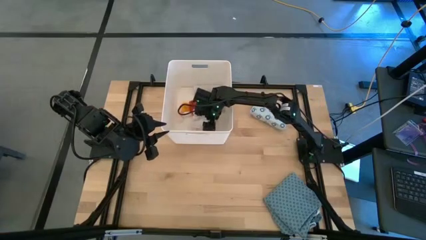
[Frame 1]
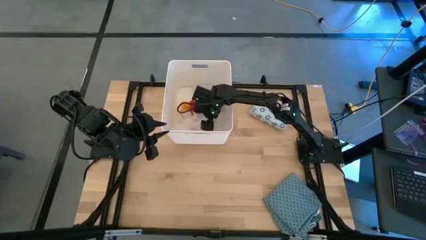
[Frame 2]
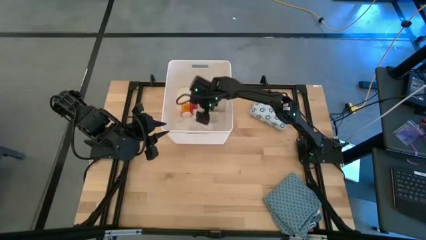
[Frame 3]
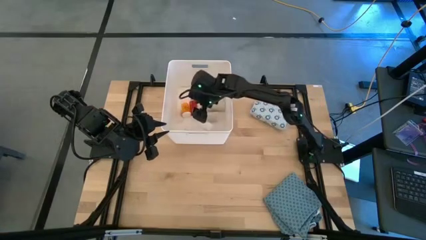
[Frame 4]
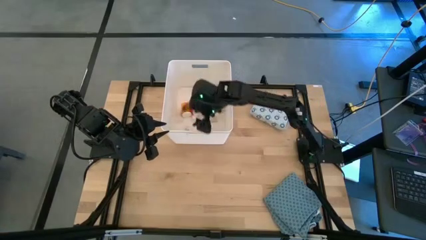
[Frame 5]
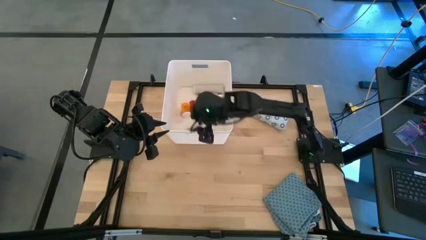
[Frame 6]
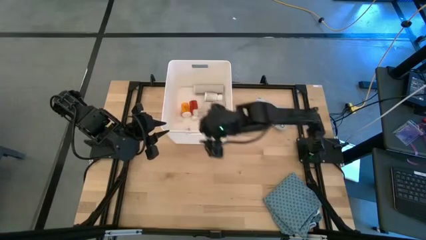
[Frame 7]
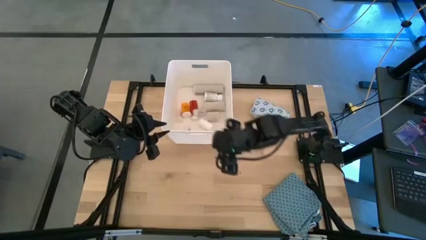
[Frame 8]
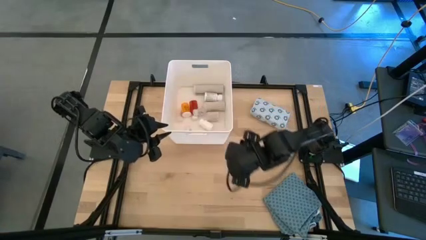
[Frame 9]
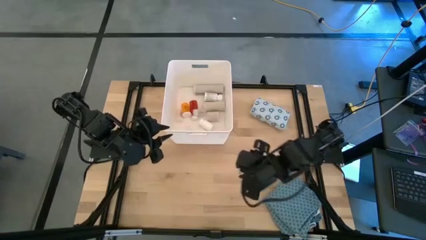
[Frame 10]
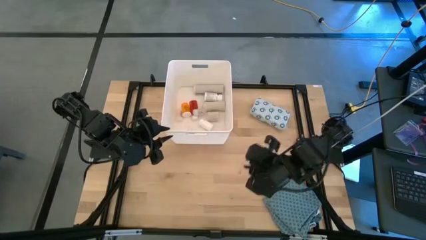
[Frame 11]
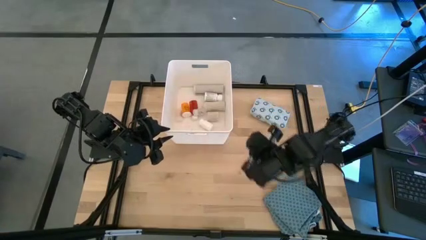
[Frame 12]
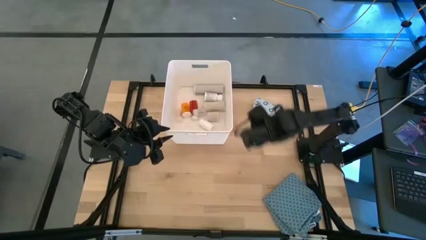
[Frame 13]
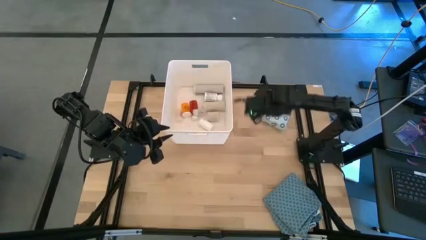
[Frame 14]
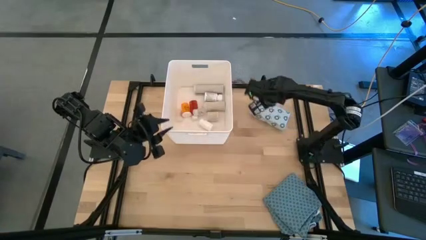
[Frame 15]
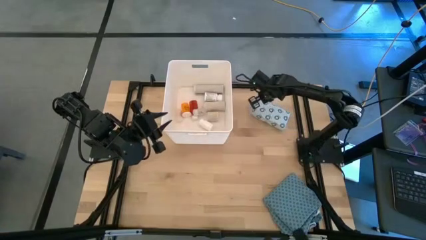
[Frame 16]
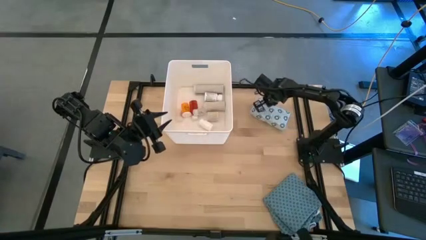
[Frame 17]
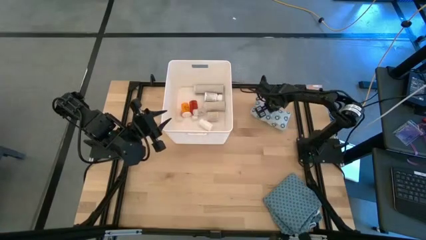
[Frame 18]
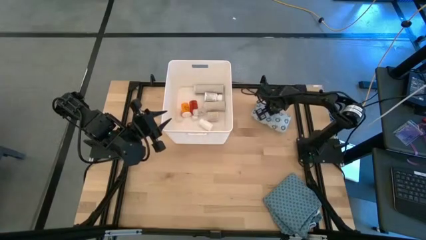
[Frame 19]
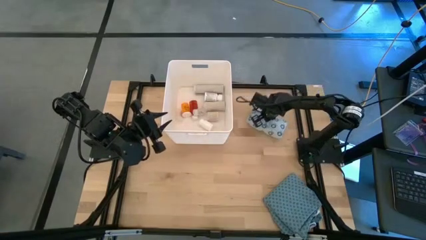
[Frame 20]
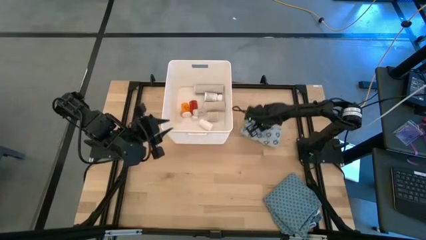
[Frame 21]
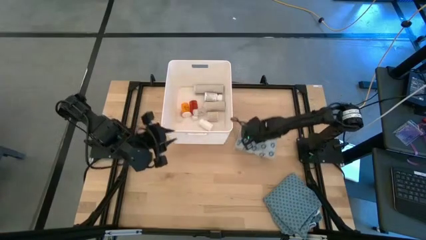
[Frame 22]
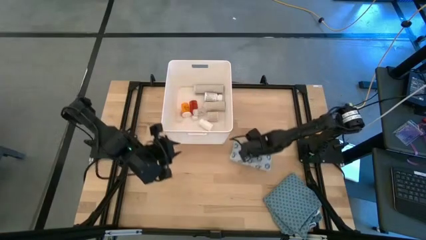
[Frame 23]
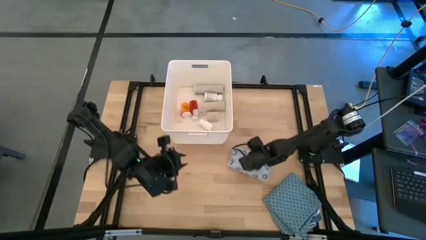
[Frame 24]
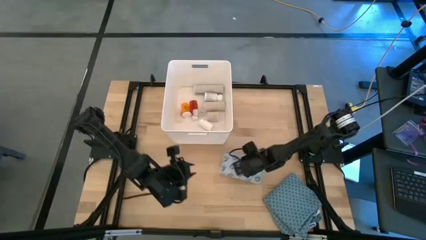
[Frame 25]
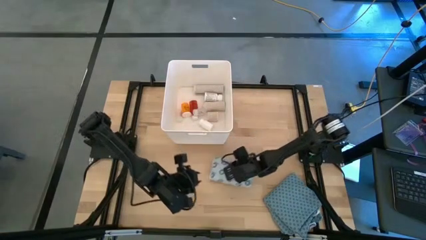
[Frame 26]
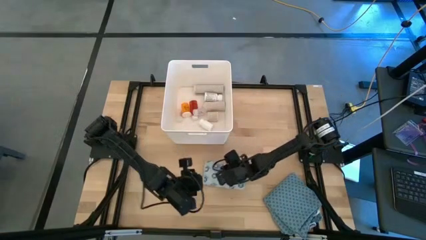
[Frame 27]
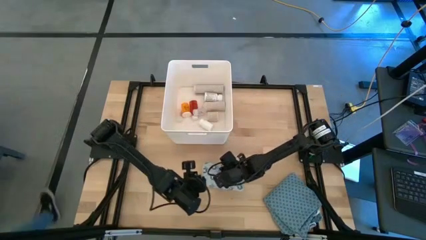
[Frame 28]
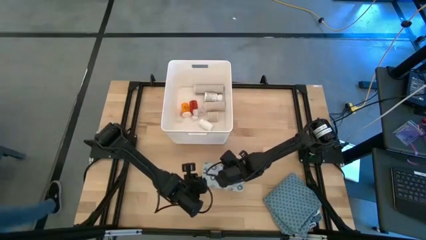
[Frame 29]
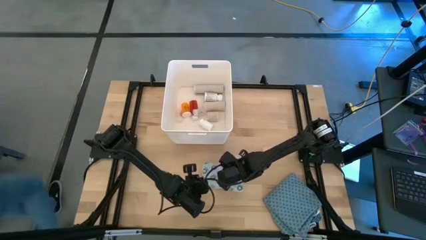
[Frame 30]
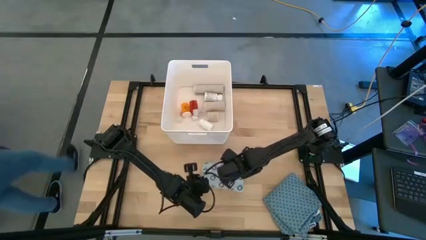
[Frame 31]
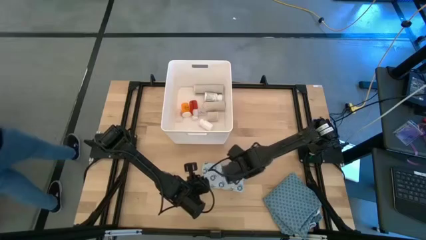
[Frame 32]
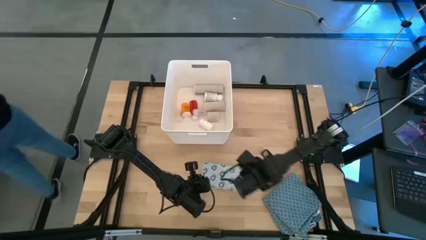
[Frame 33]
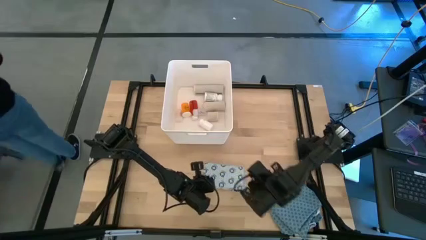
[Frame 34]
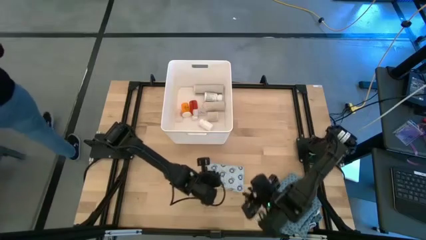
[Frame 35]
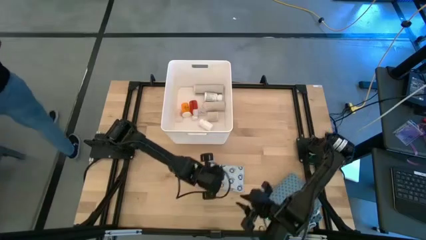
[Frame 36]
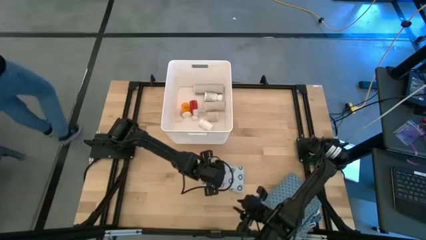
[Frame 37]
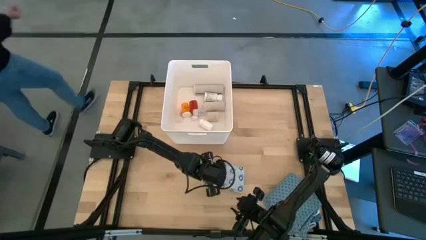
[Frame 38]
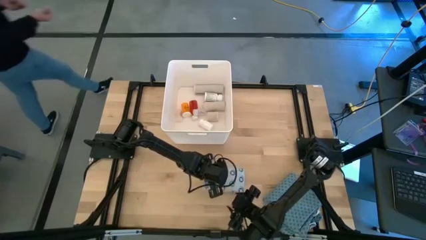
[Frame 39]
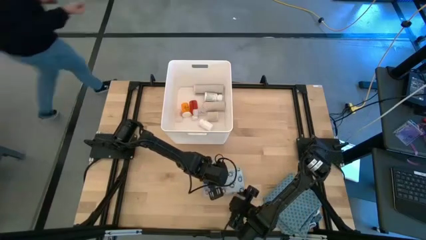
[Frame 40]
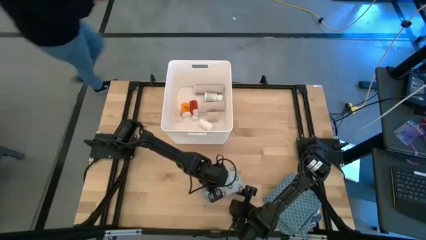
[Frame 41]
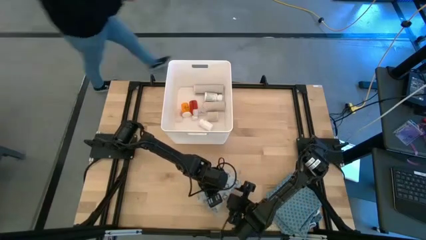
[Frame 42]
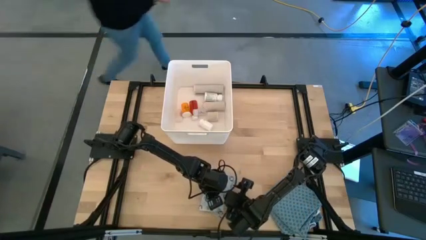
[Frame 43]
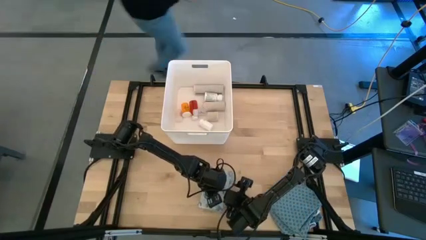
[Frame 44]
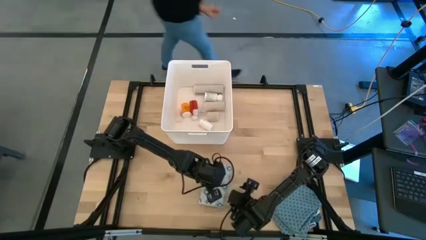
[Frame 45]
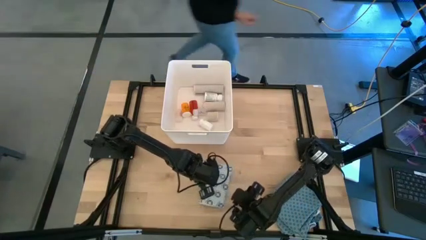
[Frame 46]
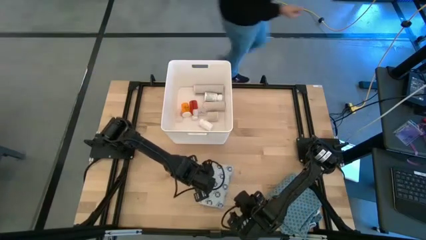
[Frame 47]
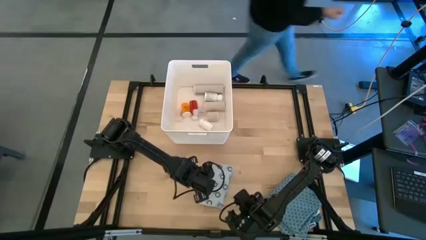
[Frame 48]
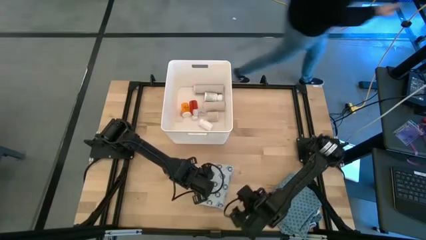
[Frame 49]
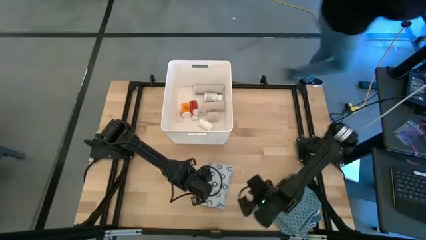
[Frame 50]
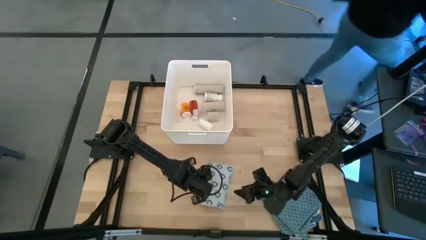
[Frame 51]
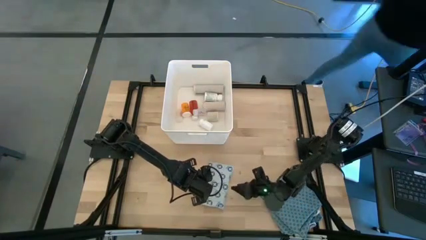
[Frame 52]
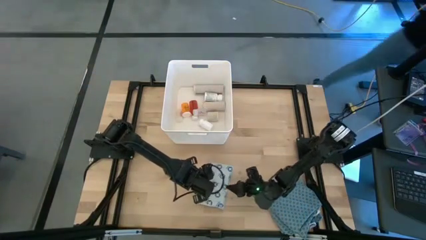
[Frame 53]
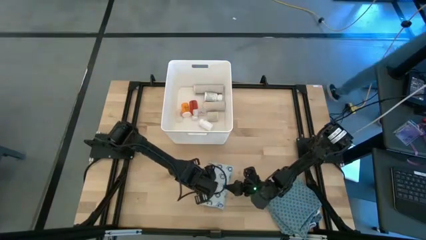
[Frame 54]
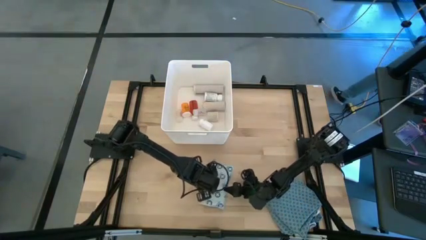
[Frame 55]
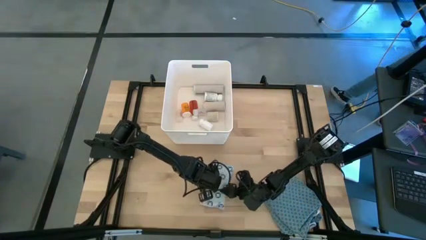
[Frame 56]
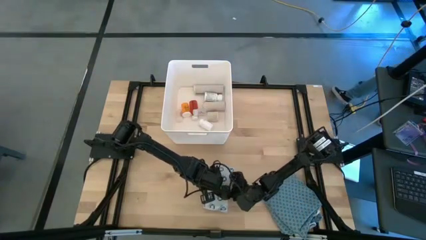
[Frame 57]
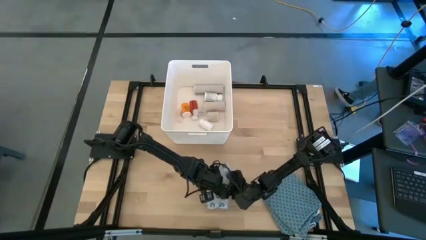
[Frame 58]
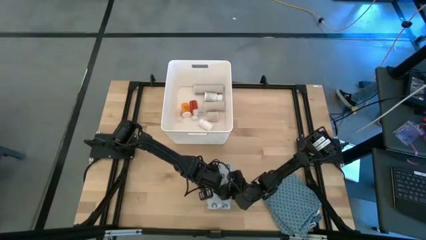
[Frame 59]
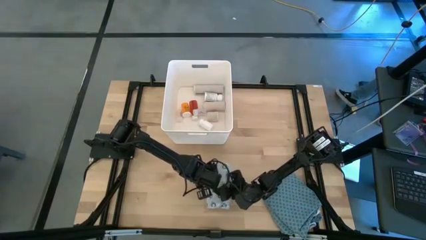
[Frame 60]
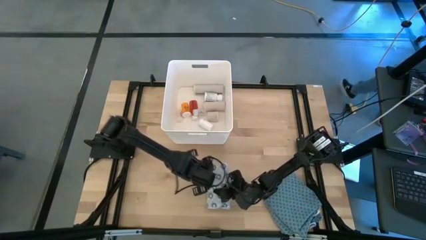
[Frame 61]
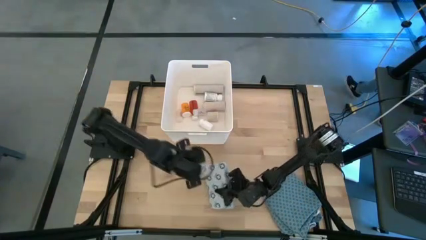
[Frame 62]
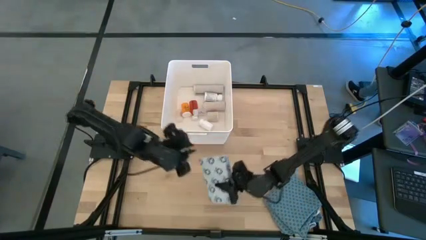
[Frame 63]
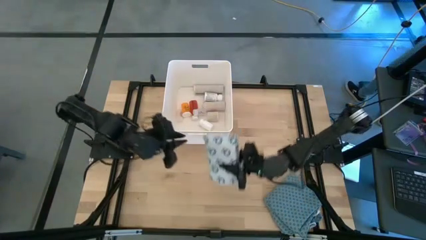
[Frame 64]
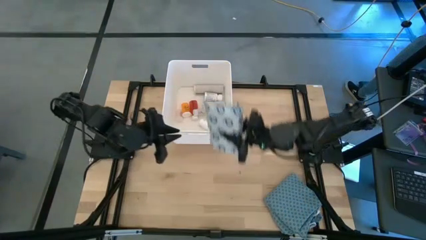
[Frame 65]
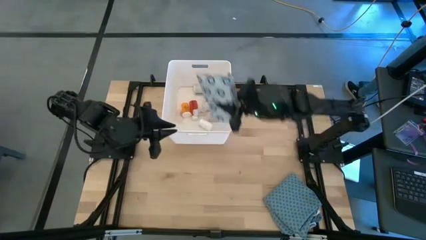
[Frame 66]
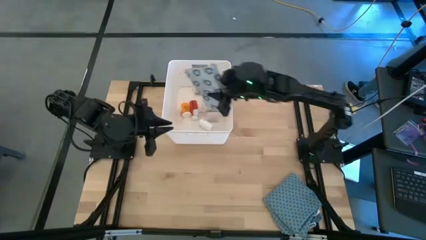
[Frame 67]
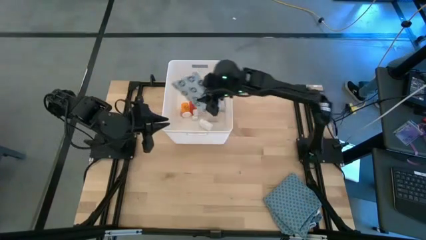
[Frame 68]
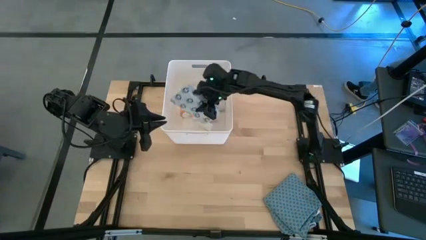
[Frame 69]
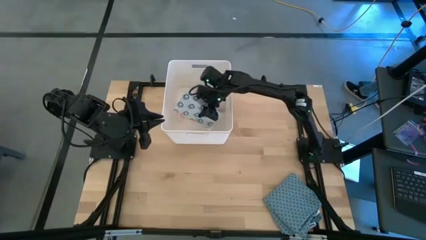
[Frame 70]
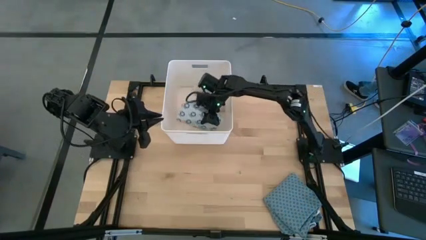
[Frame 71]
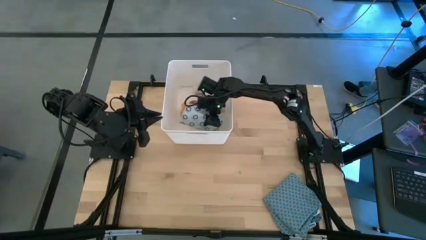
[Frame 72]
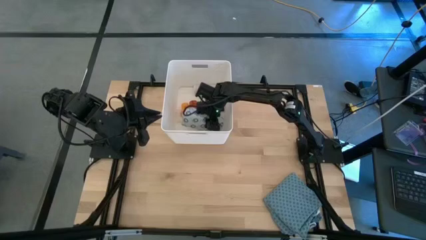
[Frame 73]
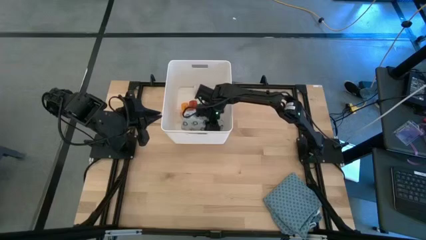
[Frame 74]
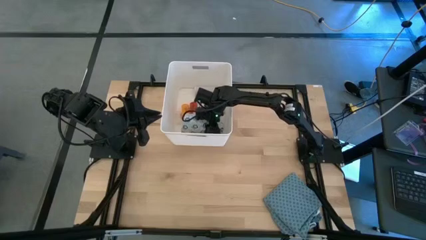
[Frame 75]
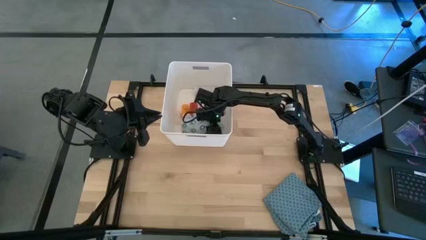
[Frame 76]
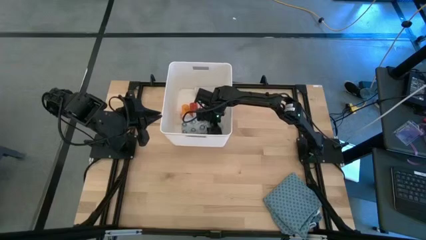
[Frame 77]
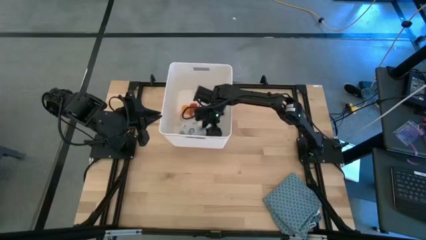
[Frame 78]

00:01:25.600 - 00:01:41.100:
Task: Pick & place medical supplies in basket/bin
Put the mailer bag into the white bin
